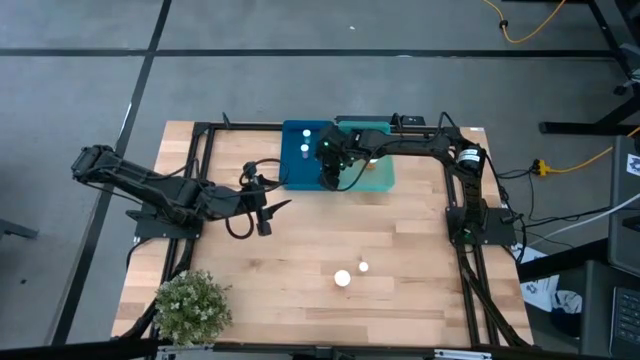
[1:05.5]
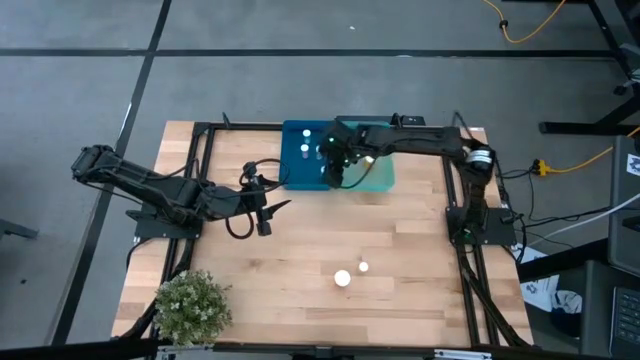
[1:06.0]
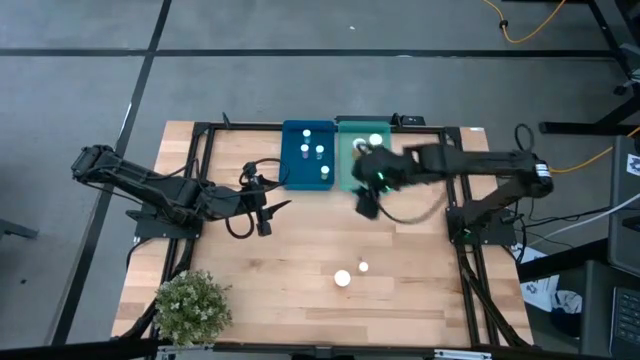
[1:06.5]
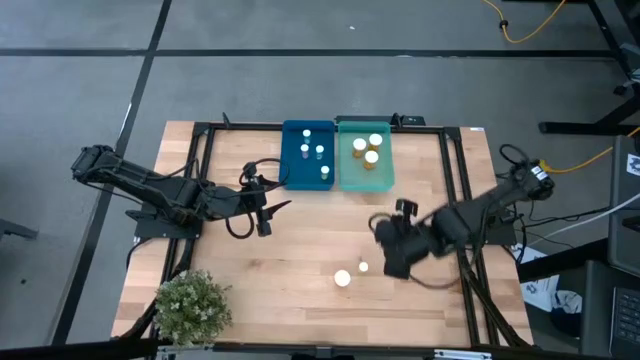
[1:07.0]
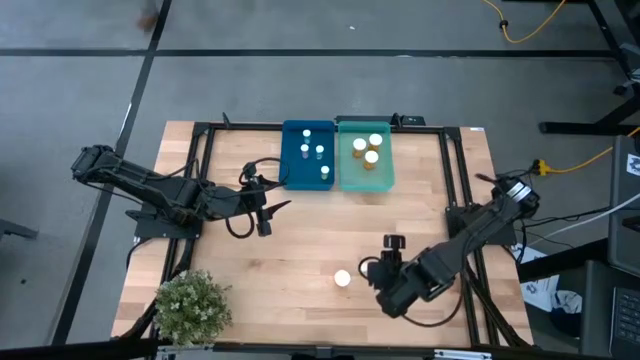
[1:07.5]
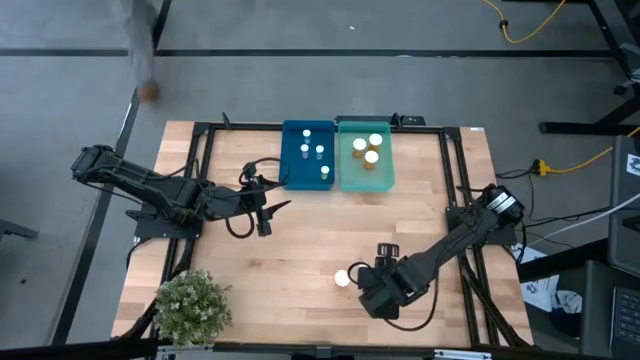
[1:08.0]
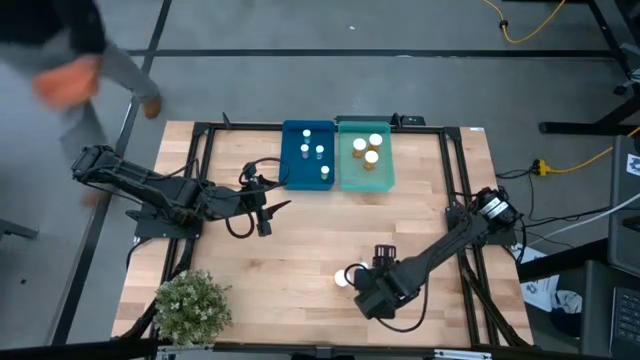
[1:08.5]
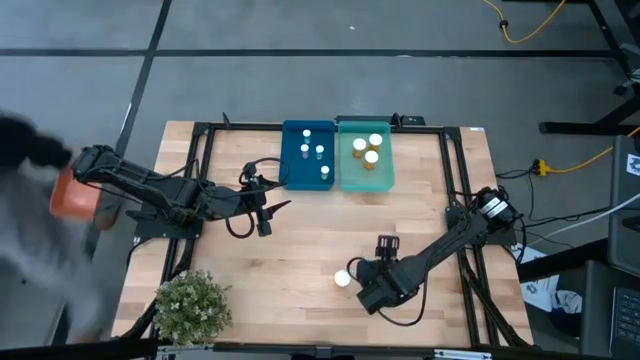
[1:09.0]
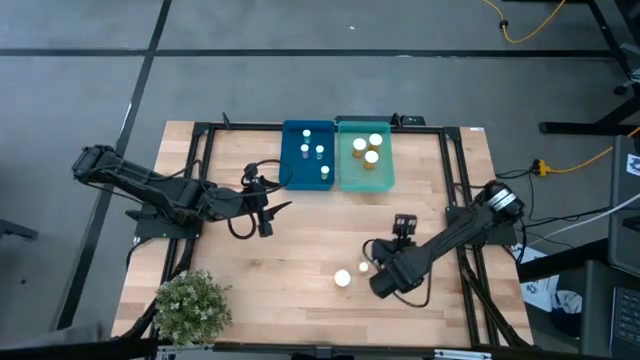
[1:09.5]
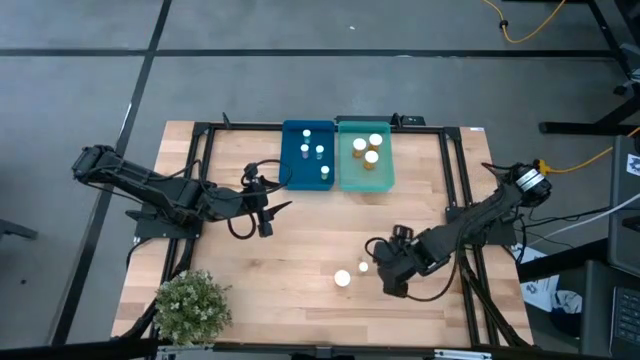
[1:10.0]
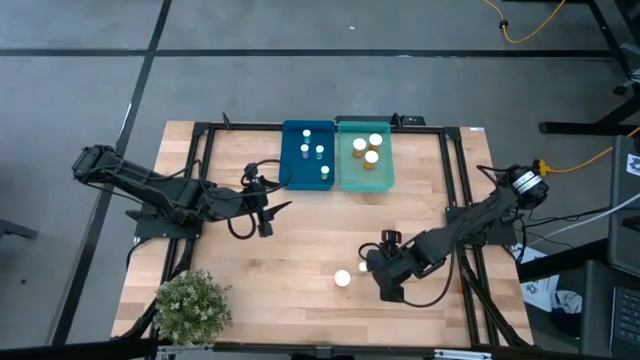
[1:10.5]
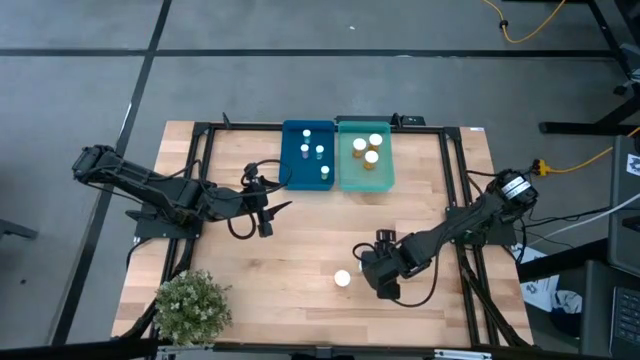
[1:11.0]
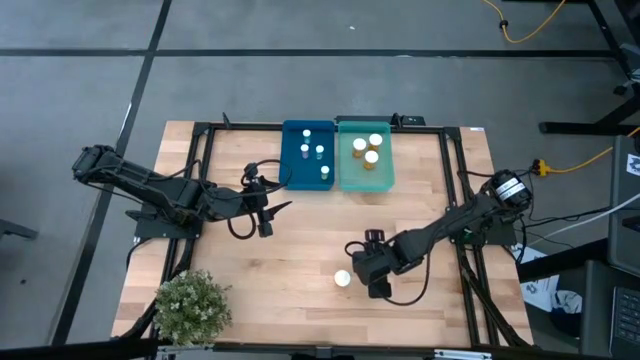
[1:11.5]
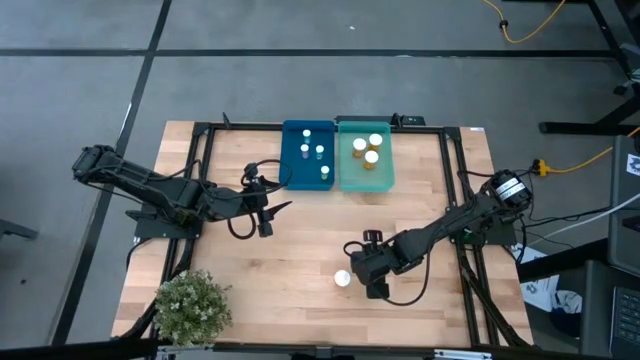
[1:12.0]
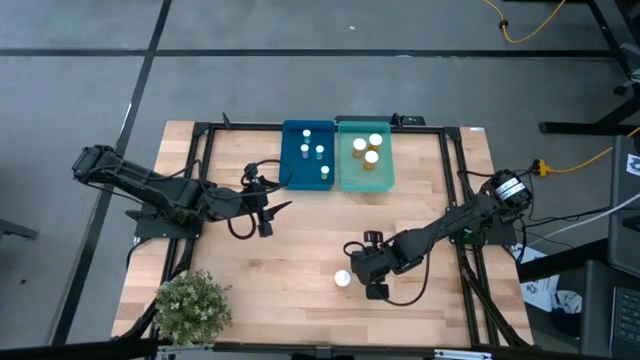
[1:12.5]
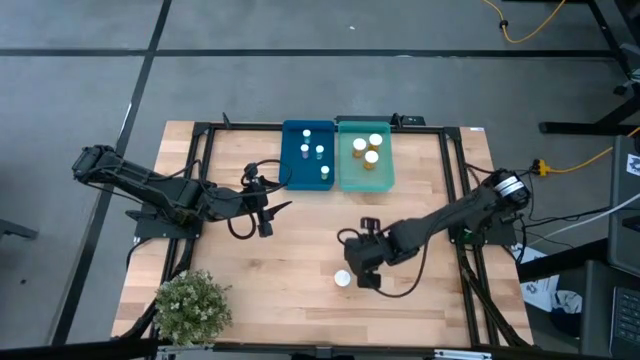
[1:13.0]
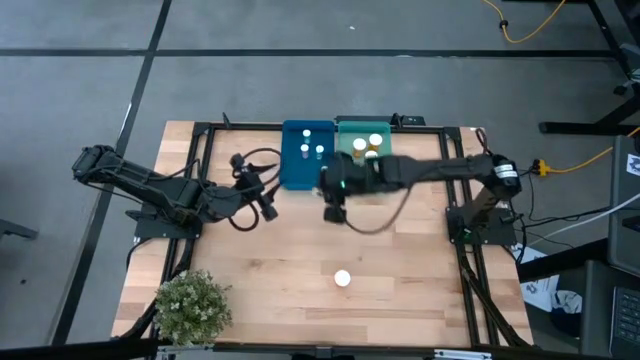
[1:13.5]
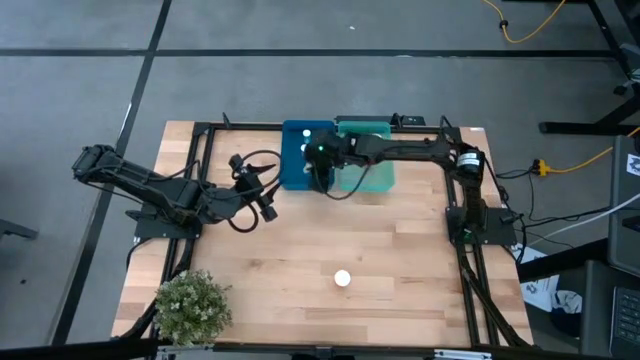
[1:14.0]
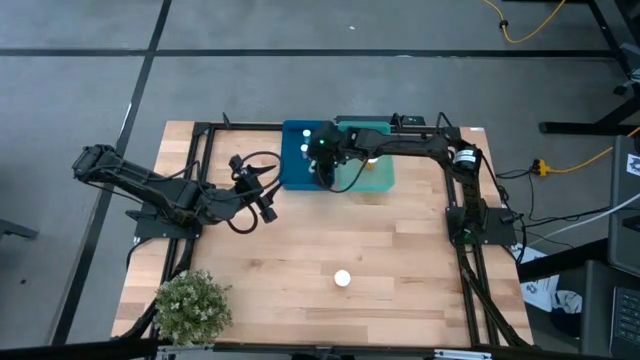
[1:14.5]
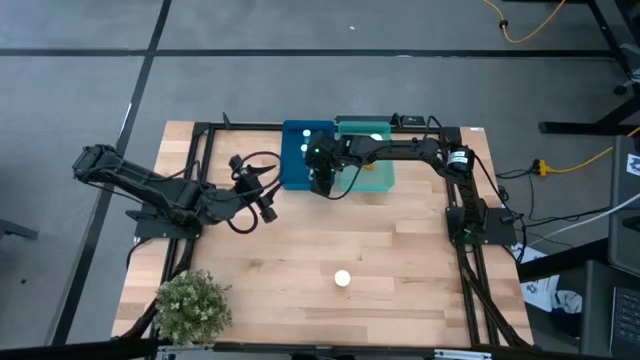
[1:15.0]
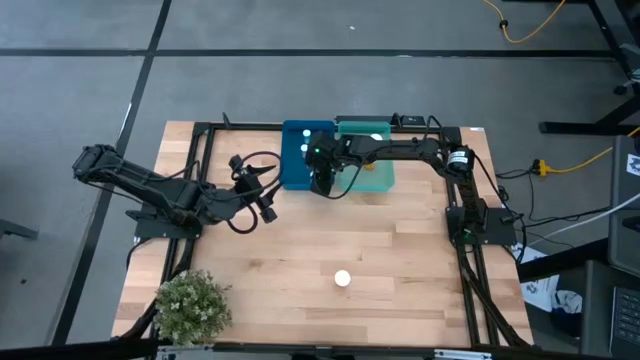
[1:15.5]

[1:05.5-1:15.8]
Task: Pick and place medicine bottles into bin by pill shape (circle, oval)
Put the yellow pill bottle into the blue bin

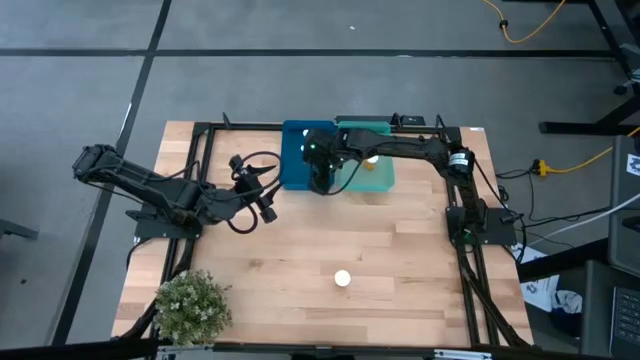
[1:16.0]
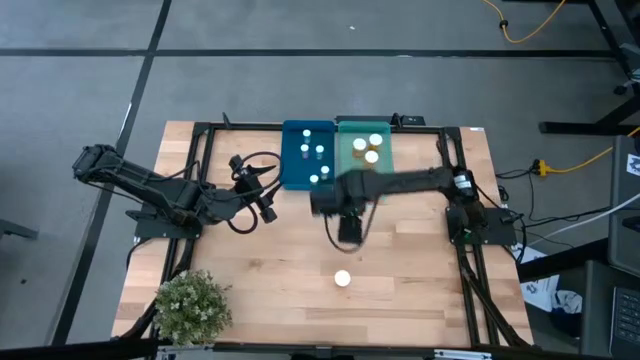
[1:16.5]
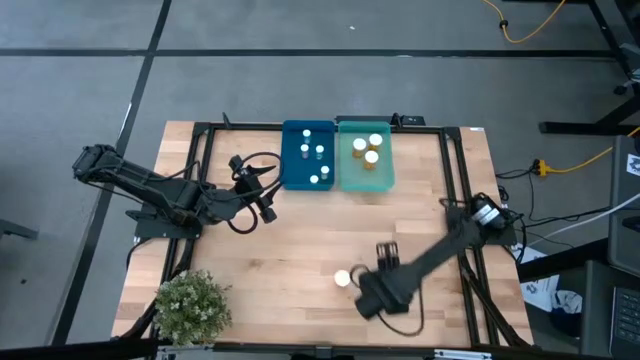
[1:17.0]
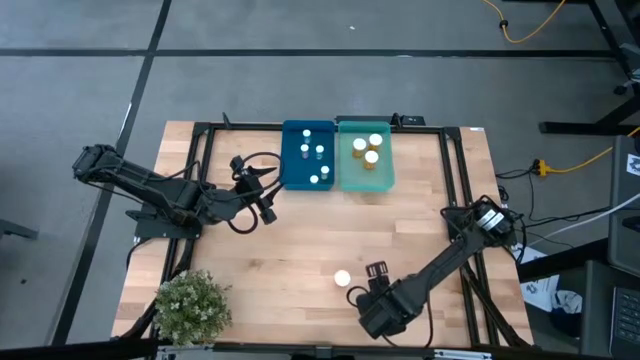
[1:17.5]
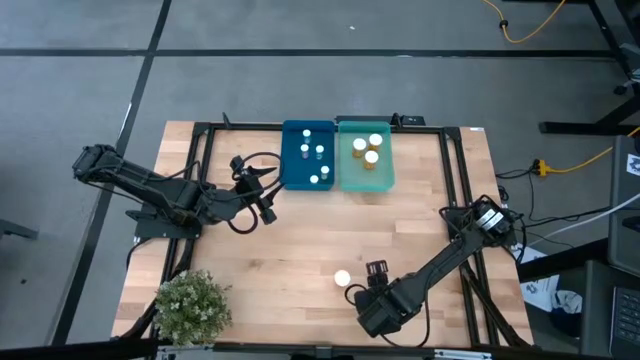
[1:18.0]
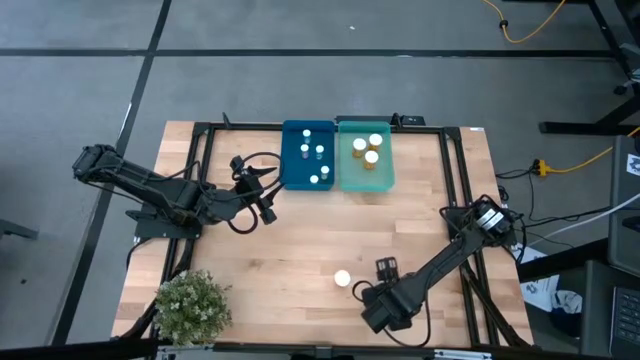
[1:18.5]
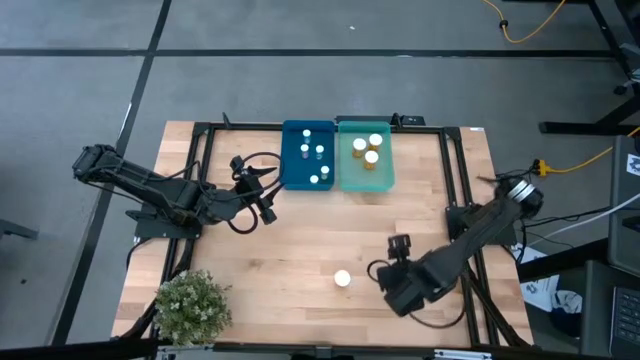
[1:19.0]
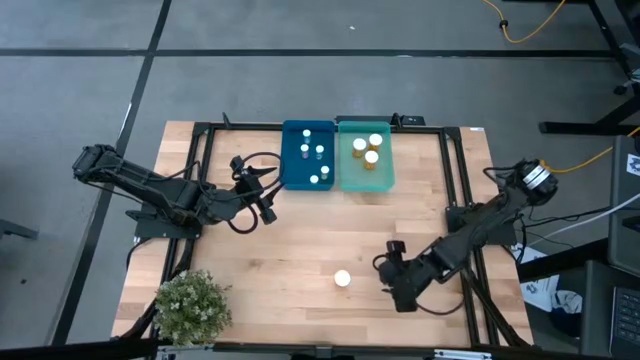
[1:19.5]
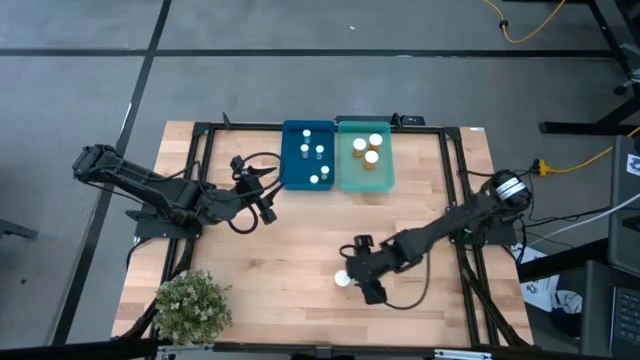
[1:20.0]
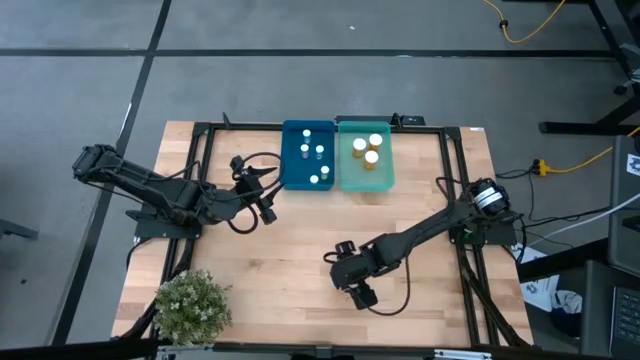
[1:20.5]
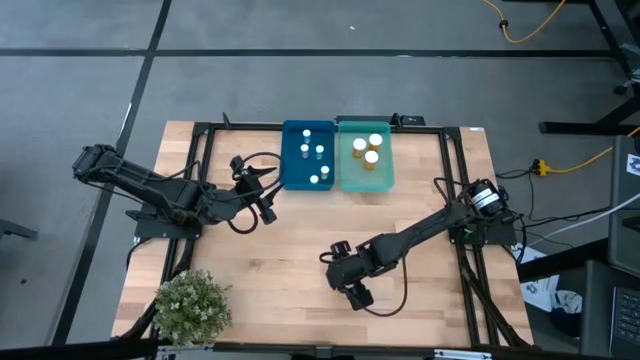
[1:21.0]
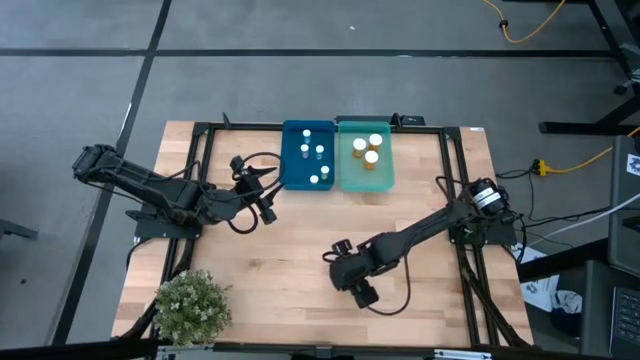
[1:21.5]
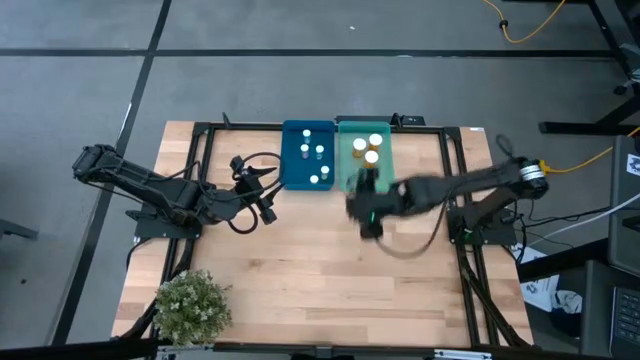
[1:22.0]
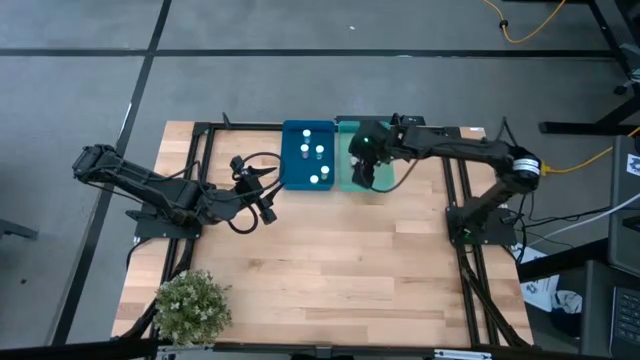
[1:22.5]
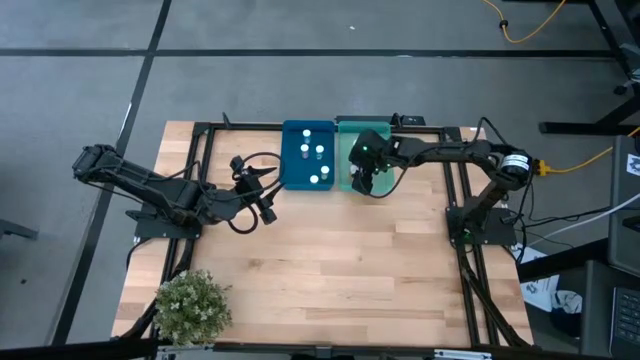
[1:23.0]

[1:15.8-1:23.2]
Put the orange pill bottle into the light blue bin

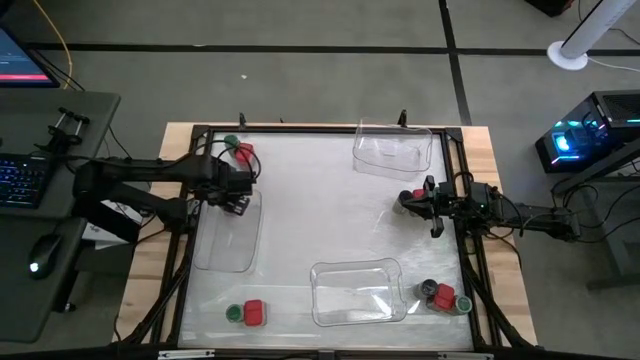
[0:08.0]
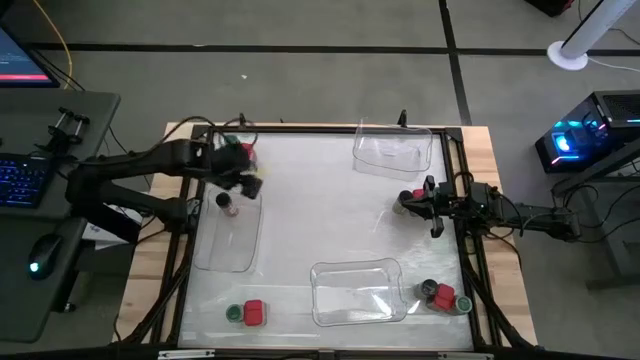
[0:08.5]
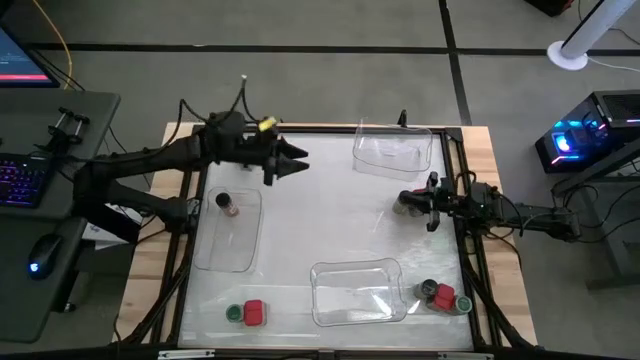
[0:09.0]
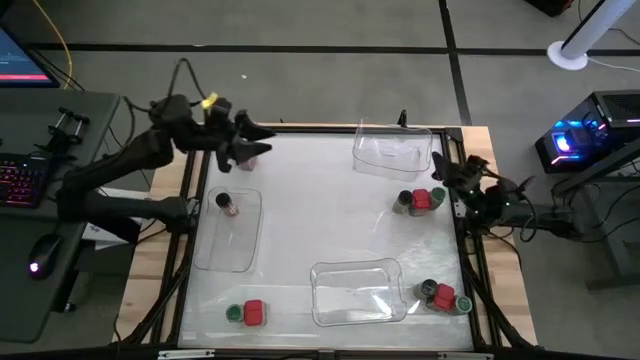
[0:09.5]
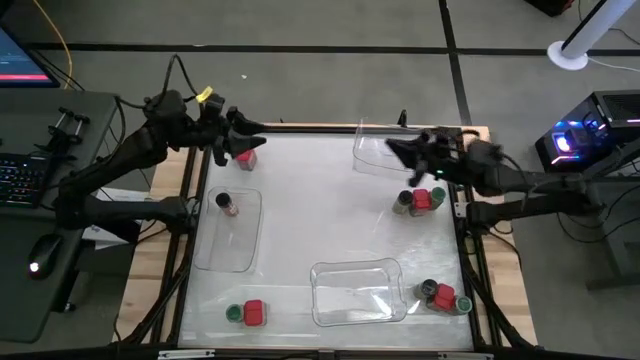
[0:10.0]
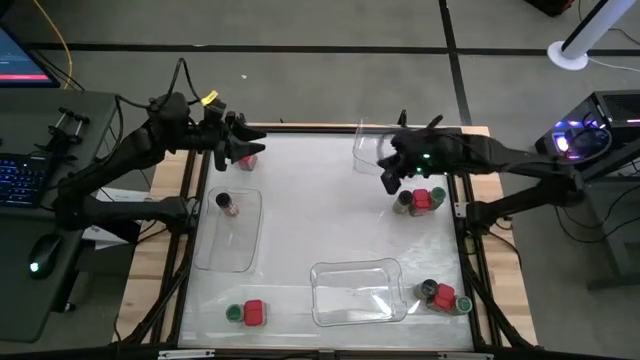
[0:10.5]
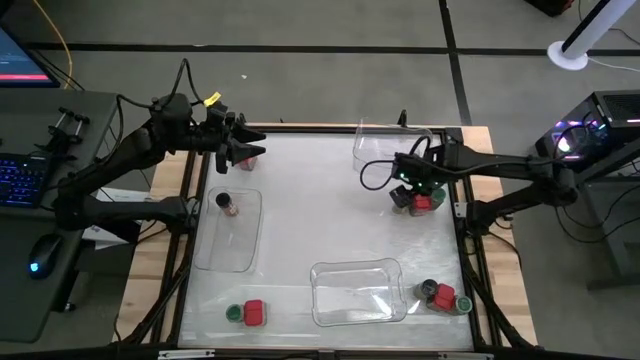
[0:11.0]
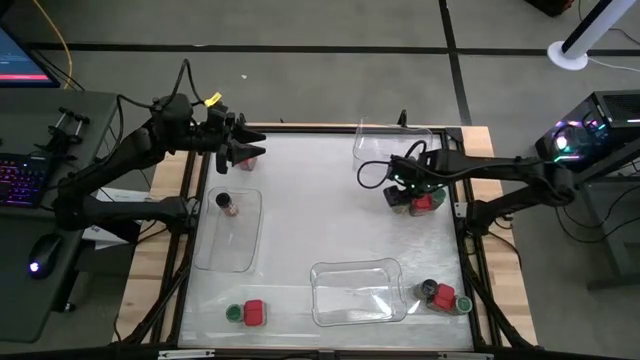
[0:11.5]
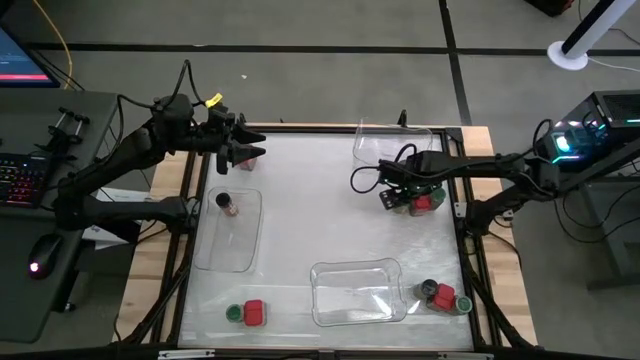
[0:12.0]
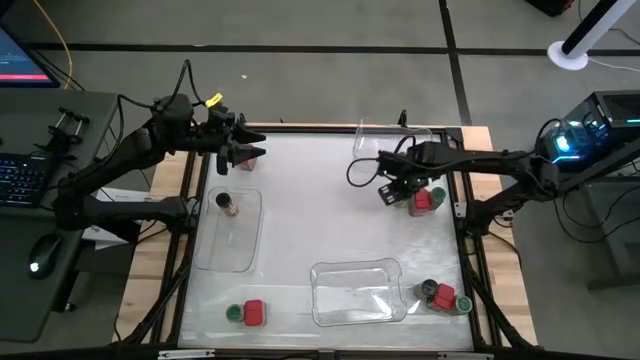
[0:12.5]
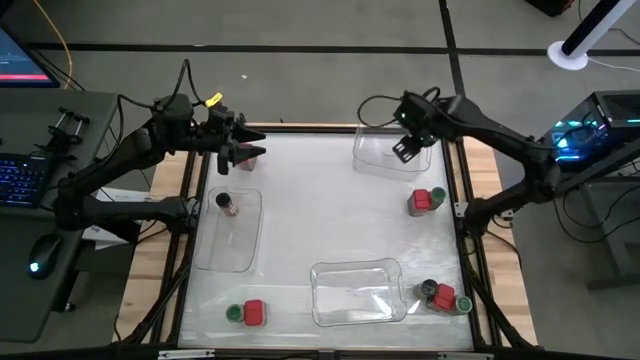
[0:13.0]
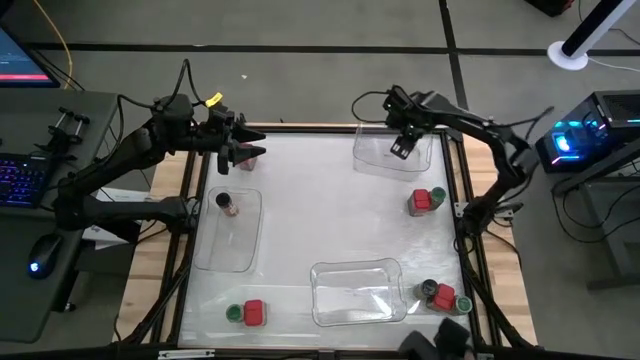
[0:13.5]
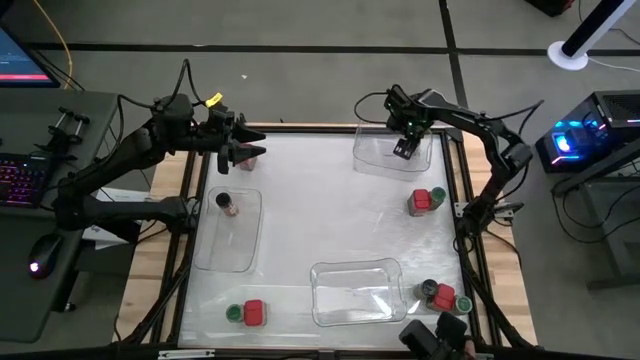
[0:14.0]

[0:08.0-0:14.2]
Task: Sort spices by type
Put the black seasoning bottle into the top right transparent bin
